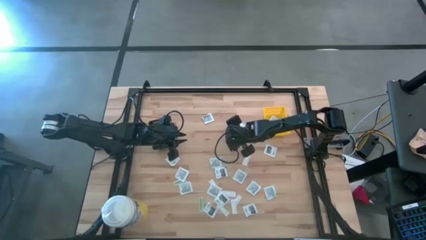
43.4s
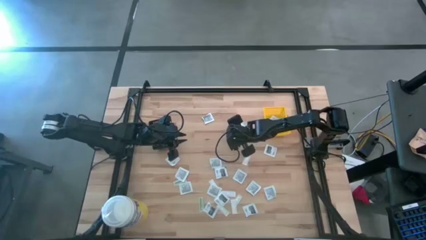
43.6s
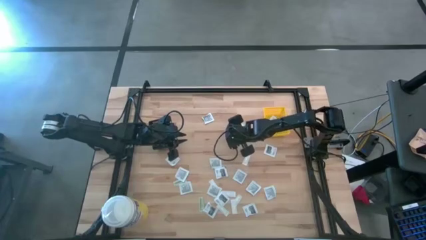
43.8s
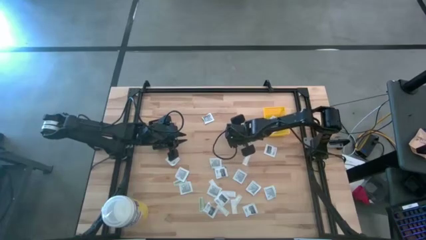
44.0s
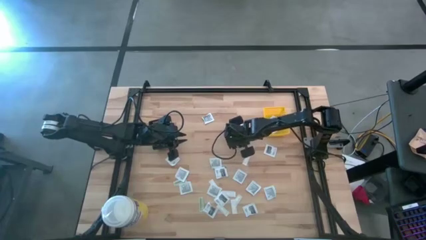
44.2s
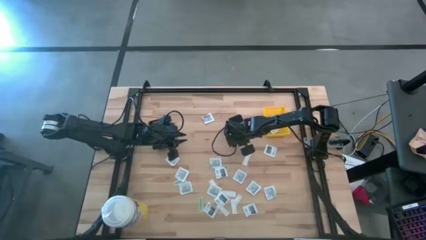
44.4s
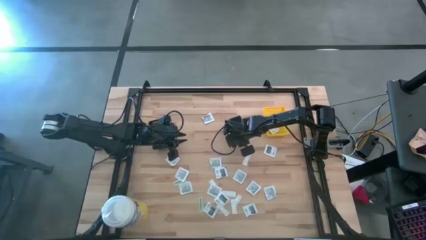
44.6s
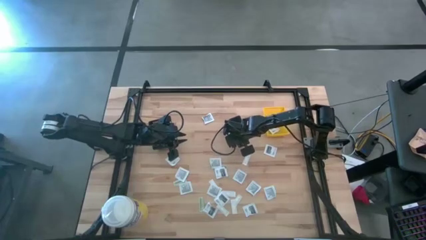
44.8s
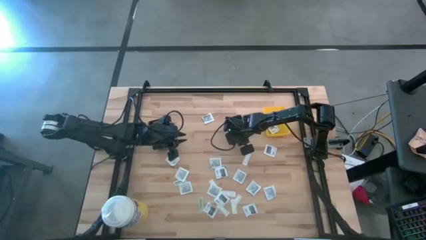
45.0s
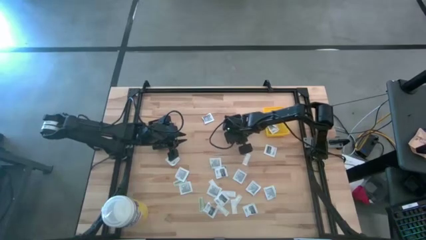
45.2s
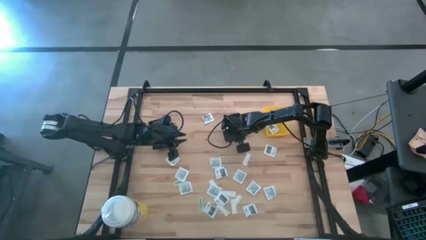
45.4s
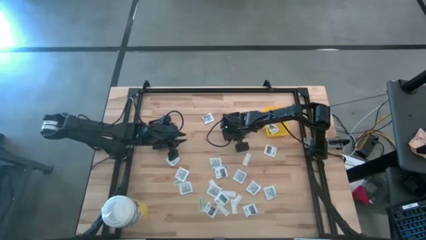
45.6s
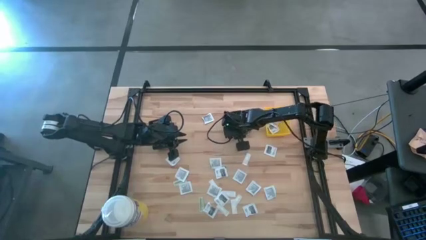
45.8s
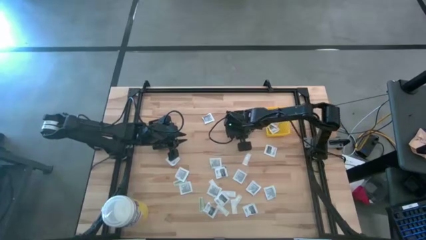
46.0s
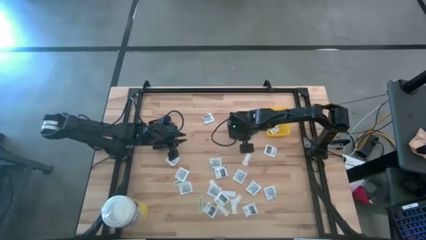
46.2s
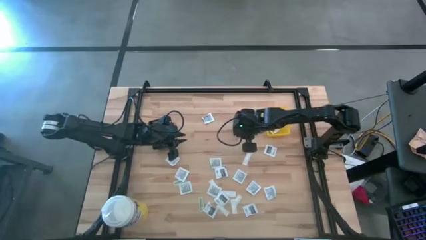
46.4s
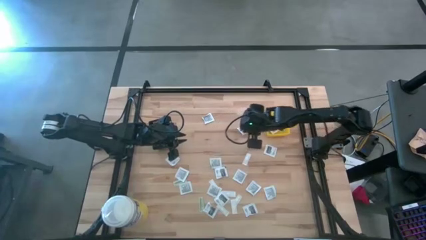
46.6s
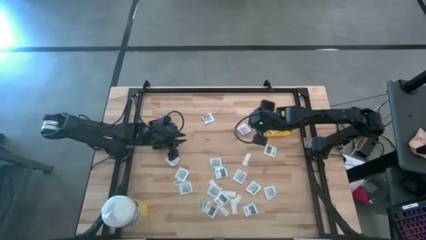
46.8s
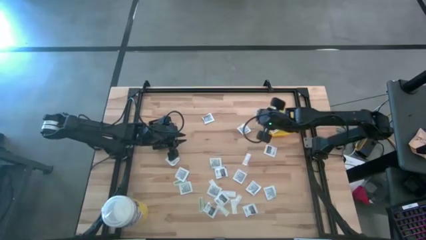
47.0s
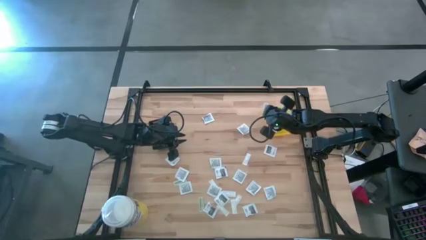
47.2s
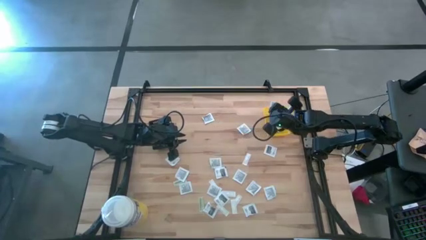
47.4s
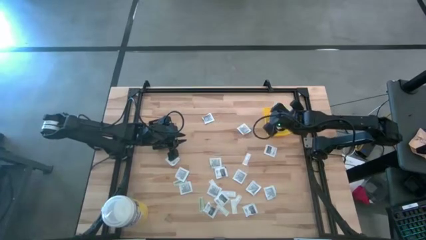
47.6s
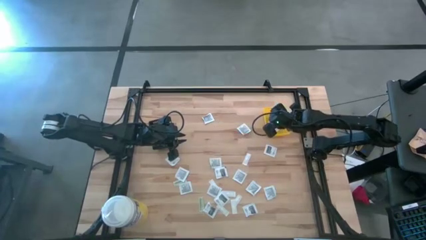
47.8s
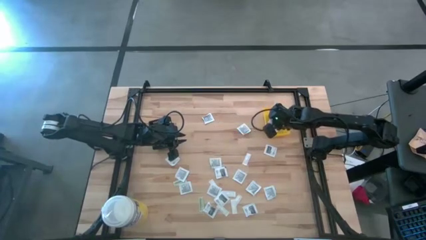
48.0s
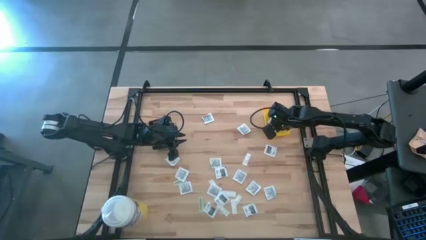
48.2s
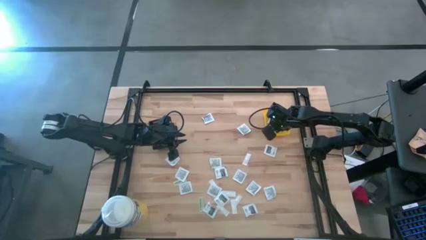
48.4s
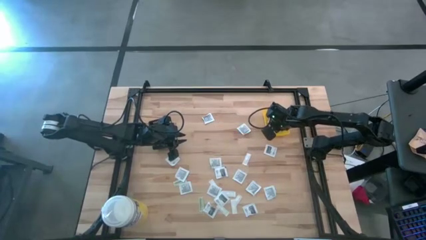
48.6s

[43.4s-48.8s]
Task: Pick & Place First Aid Supplies
Put the black pad into the yellow bin

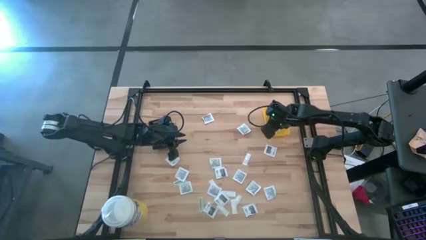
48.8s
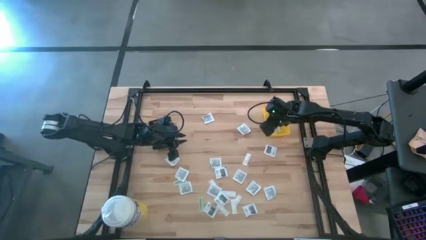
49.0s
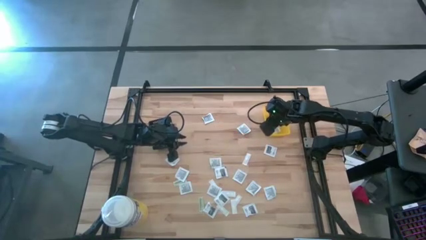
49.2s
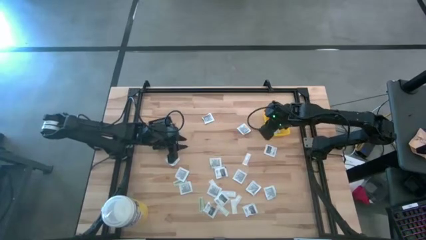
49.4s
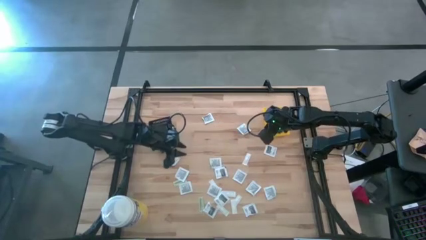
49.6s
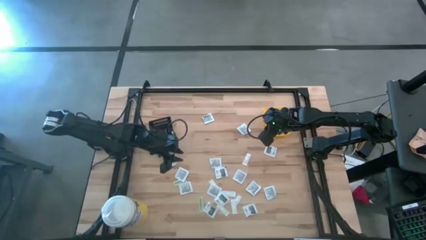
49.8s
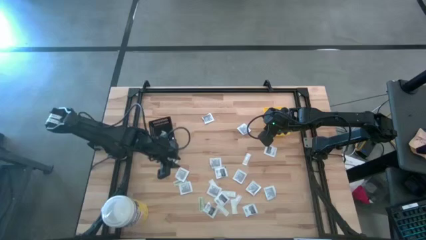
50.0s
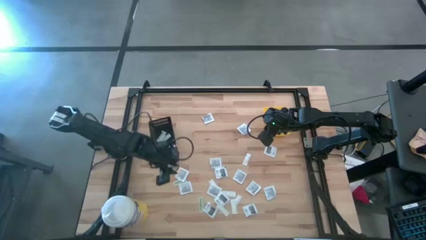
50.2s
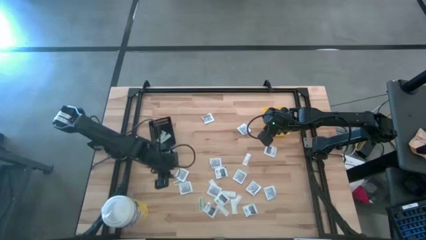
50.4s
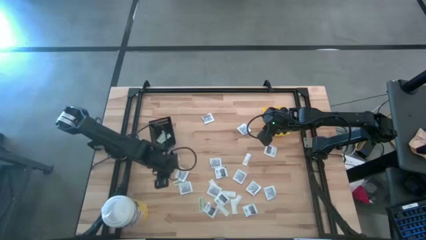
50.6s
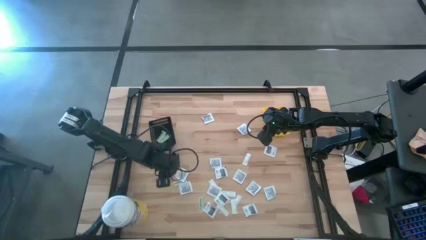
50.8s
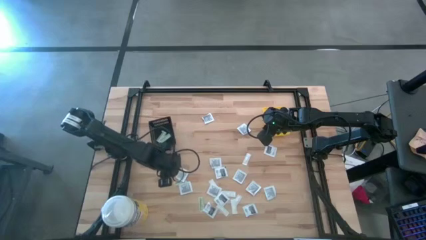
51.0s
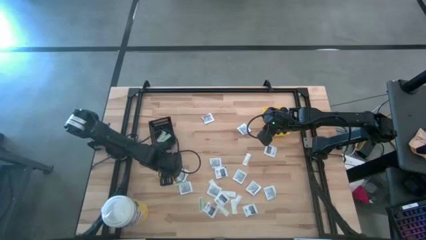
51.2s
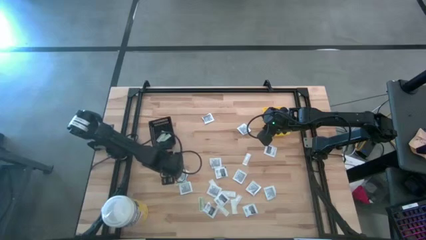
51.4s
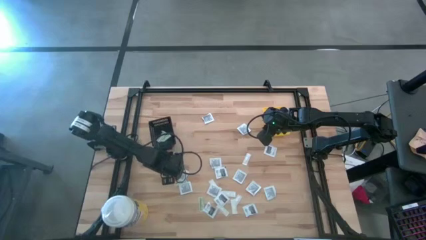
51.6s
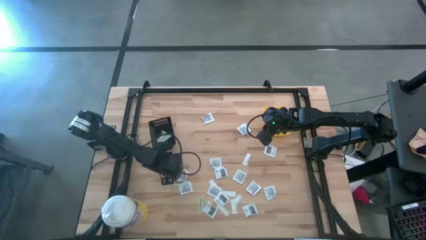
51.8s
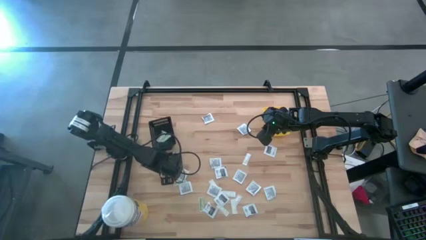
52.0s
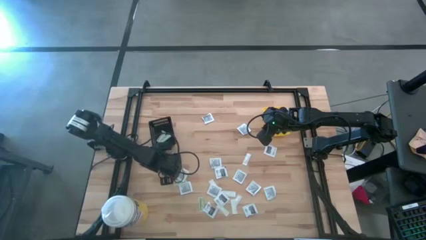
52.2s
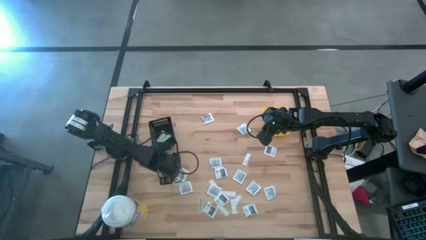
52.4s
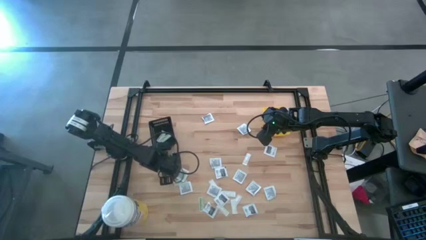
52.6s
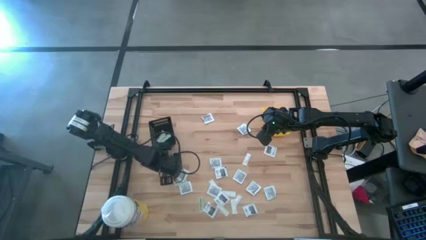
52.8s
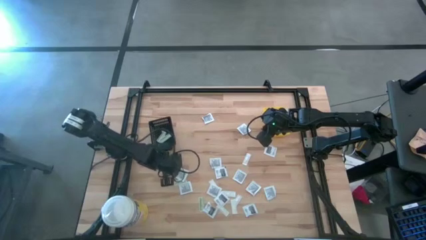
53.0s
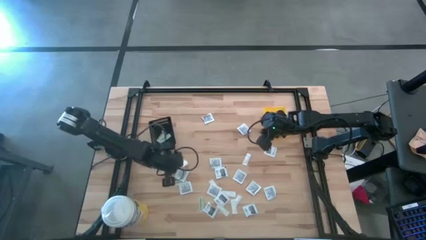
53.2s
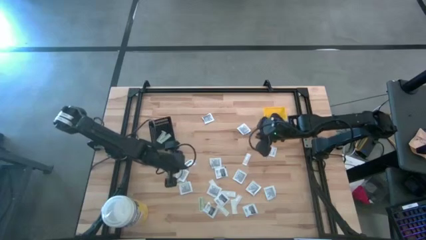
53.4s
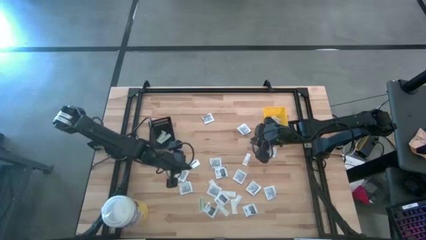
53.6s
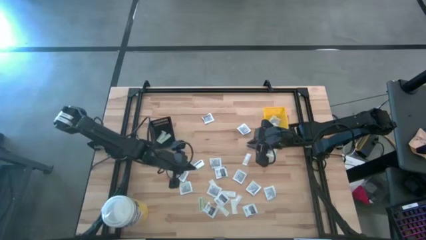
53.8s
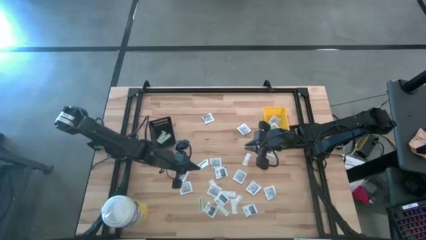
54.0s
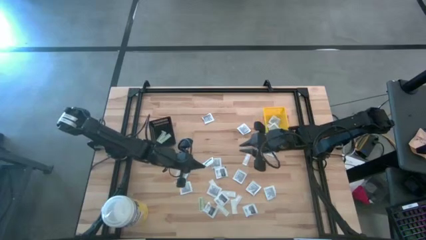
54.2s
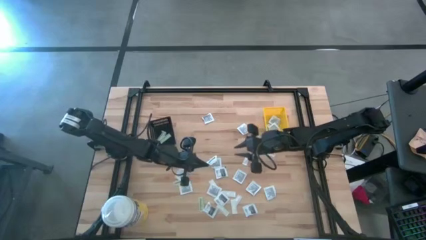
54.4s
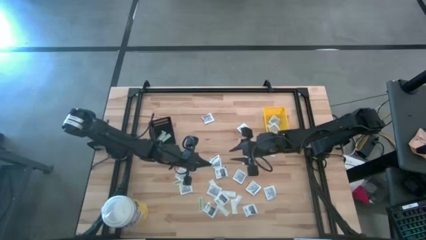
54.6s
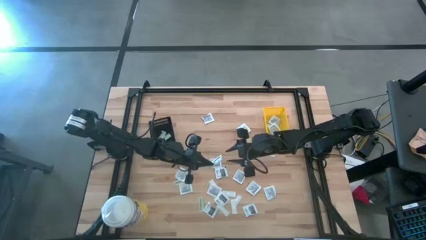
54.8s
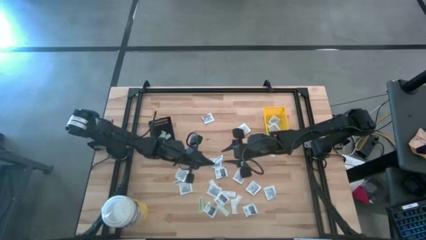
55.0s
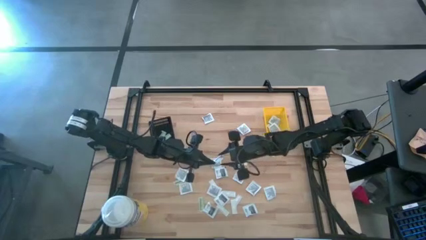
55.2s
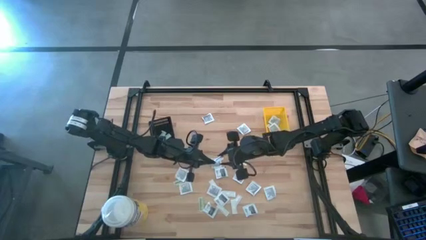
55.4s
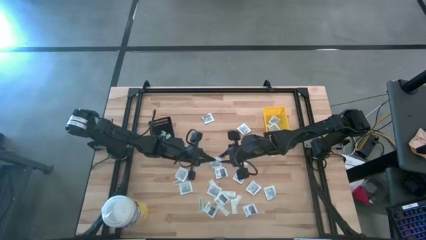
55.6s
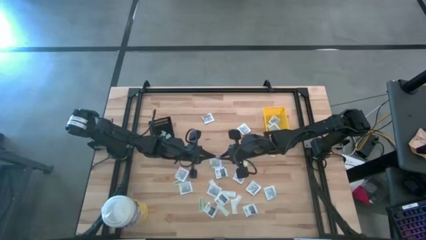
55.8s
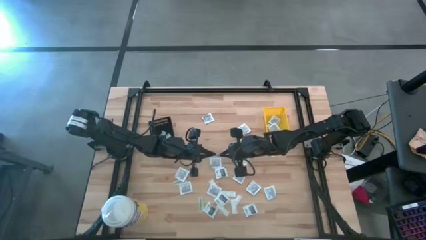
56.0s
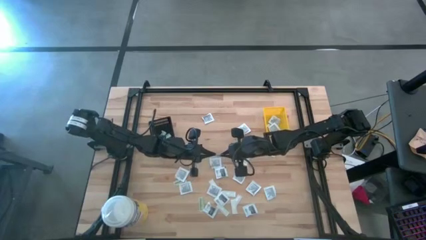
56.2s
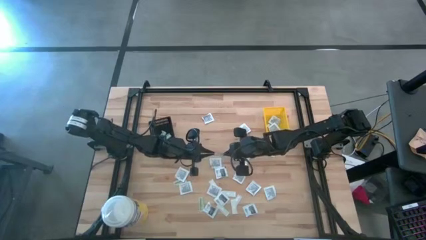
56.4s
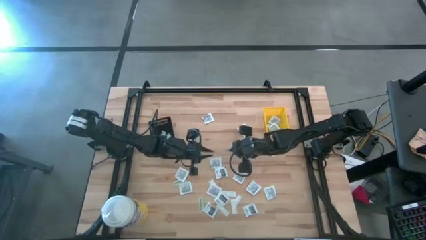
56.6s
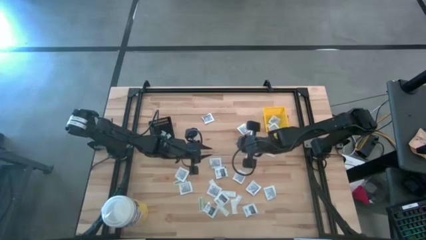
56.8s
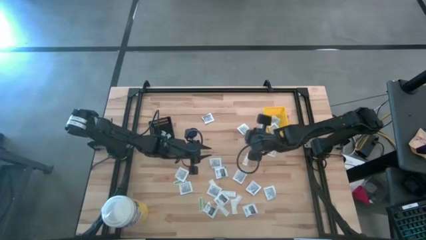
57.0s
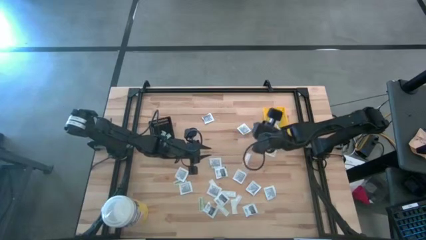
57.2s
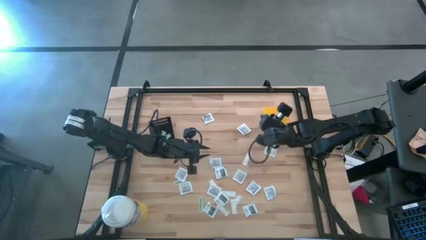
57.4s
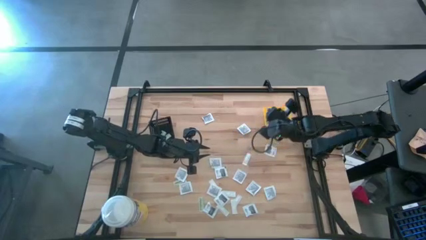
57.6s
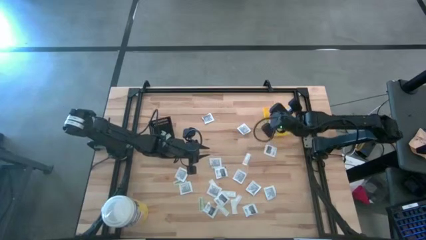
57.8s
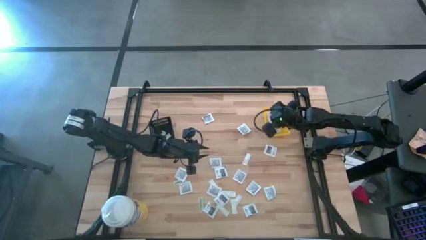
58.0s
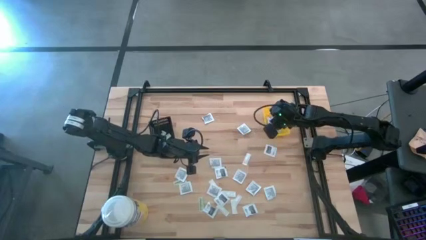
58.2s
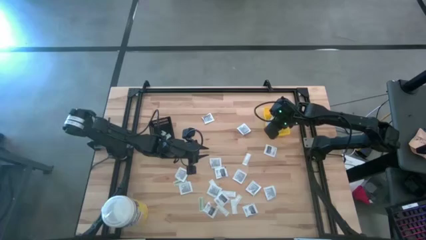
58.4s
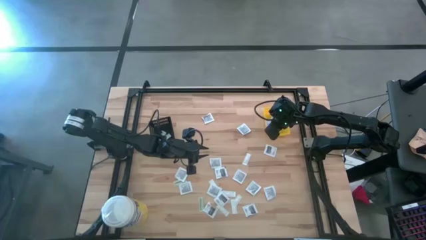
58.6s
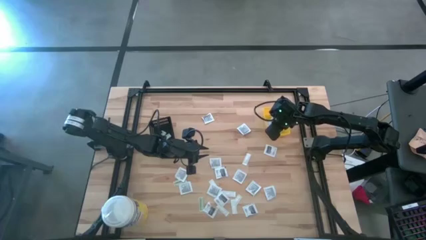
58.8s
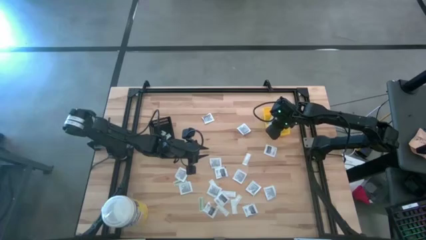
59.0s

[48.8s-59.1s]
Put the black pad into the yellow bin
